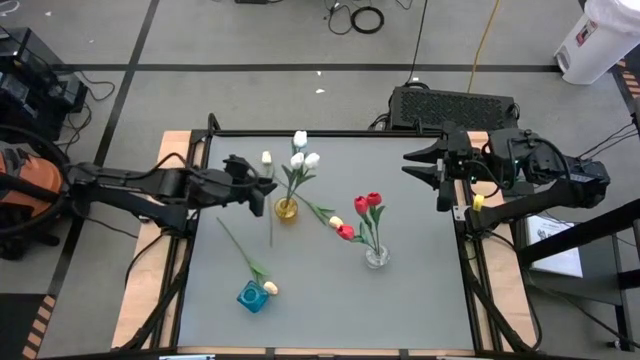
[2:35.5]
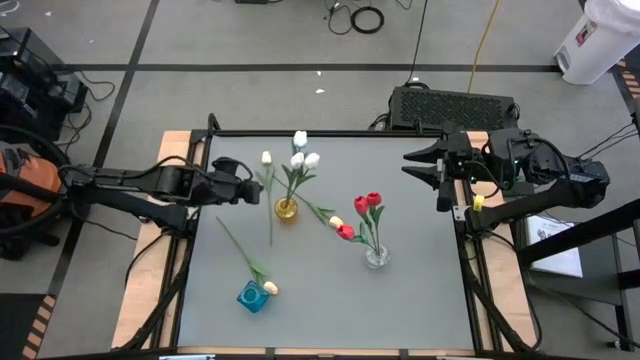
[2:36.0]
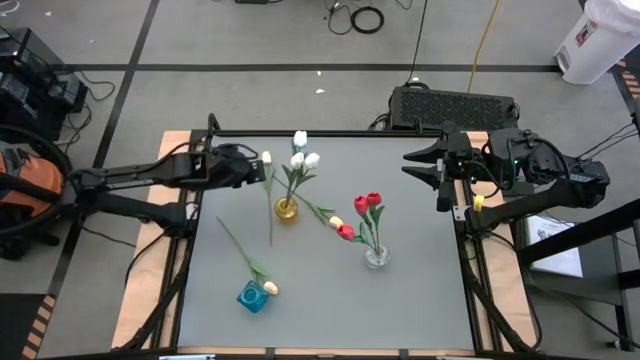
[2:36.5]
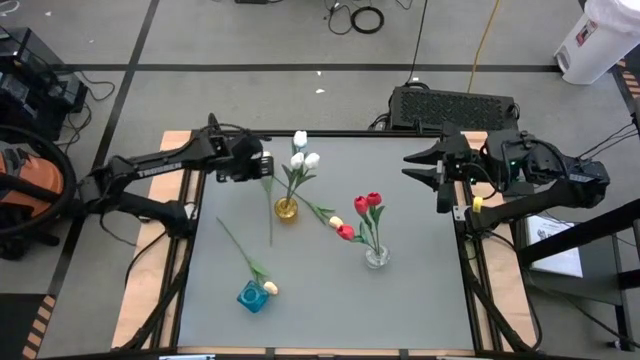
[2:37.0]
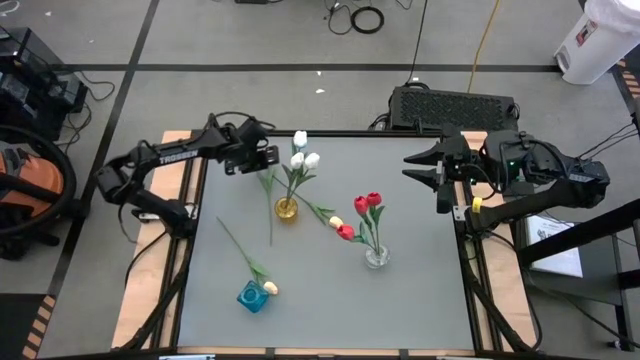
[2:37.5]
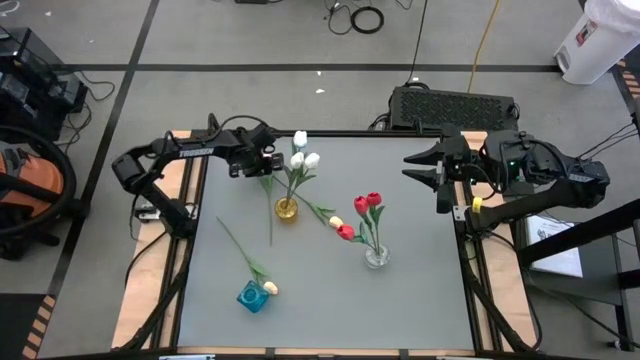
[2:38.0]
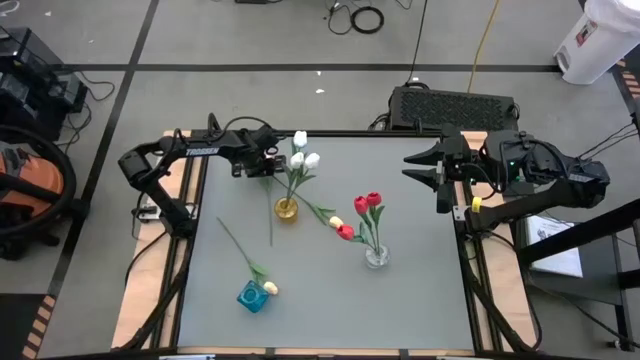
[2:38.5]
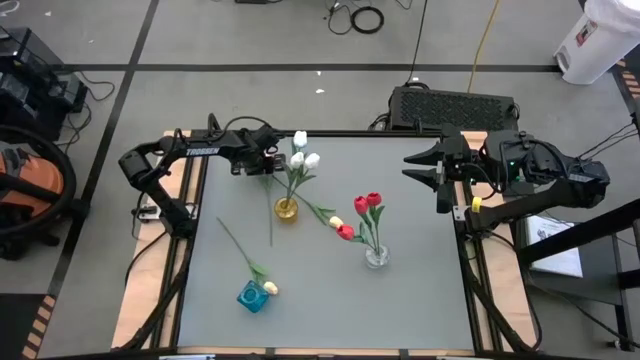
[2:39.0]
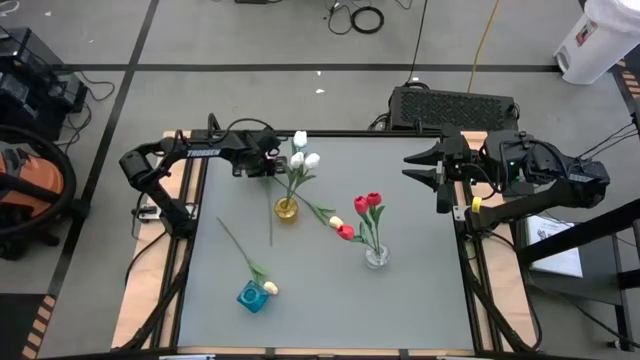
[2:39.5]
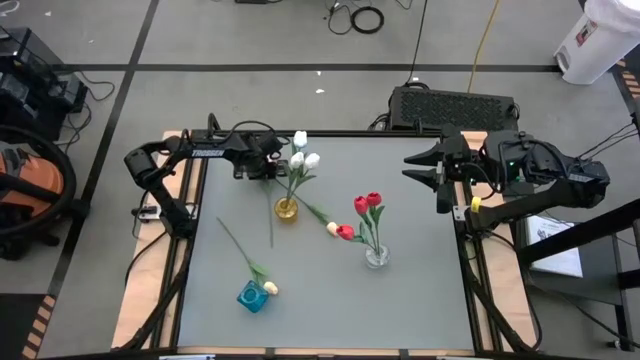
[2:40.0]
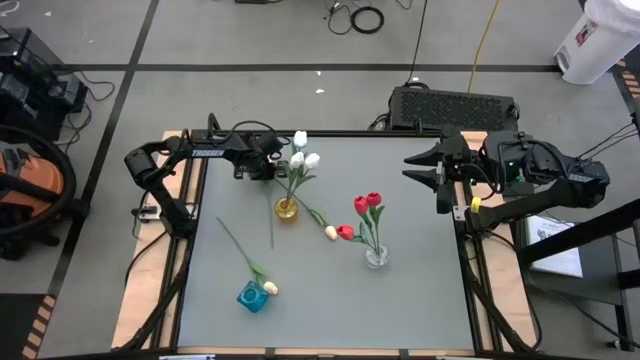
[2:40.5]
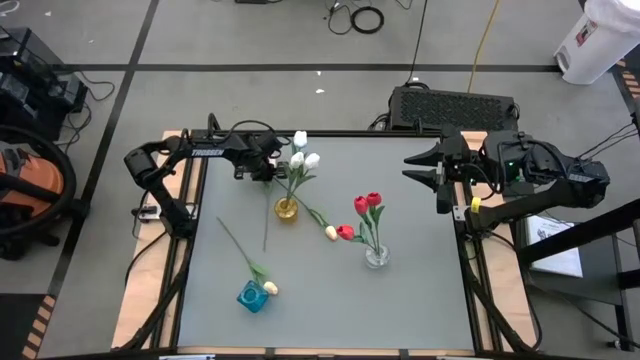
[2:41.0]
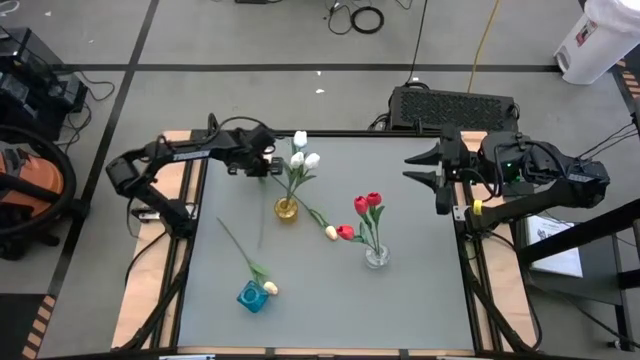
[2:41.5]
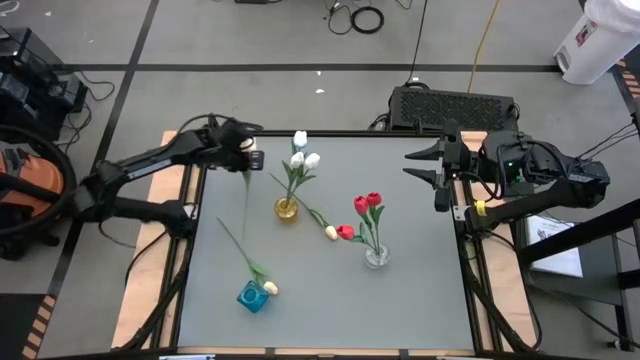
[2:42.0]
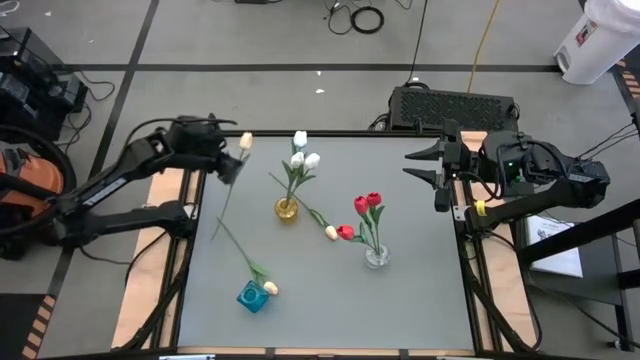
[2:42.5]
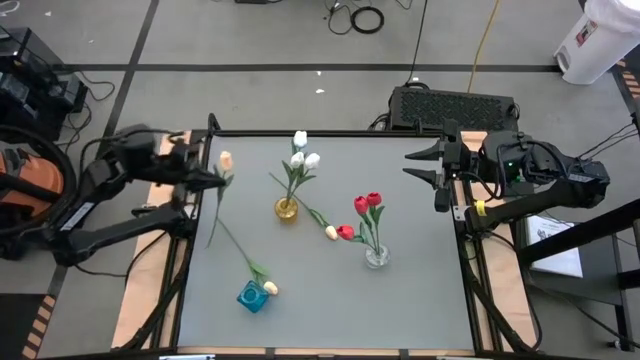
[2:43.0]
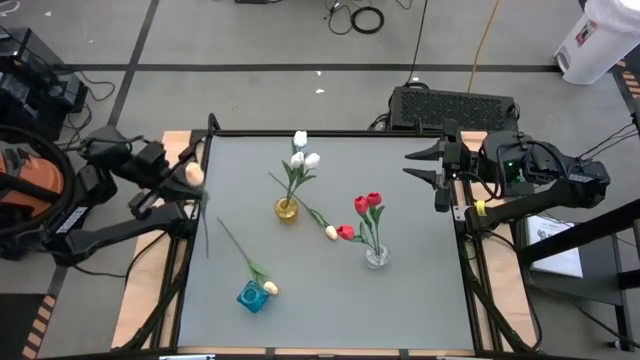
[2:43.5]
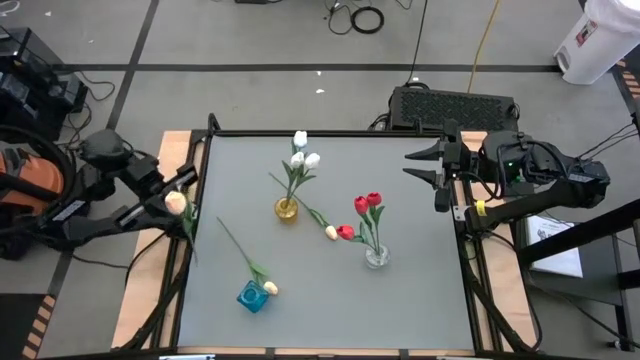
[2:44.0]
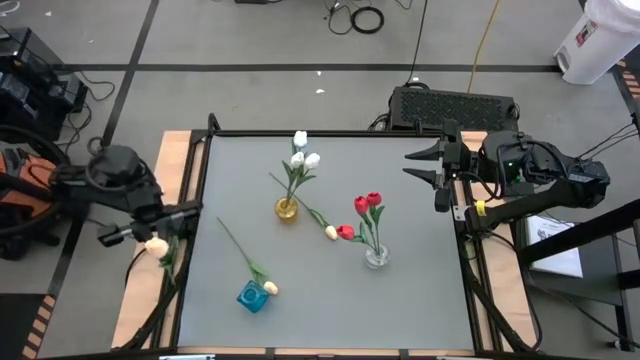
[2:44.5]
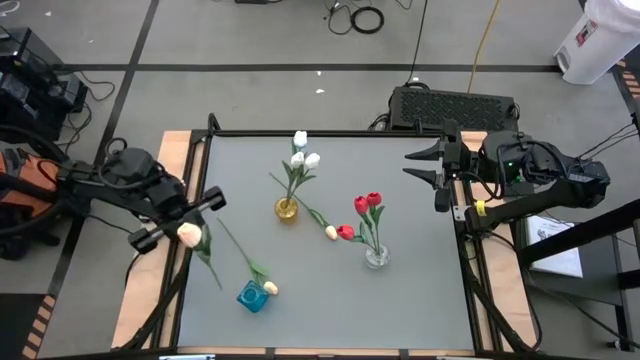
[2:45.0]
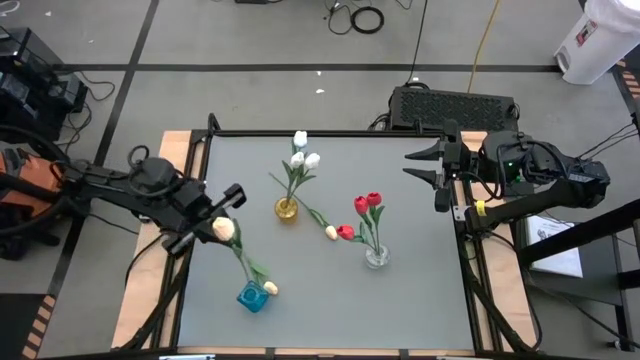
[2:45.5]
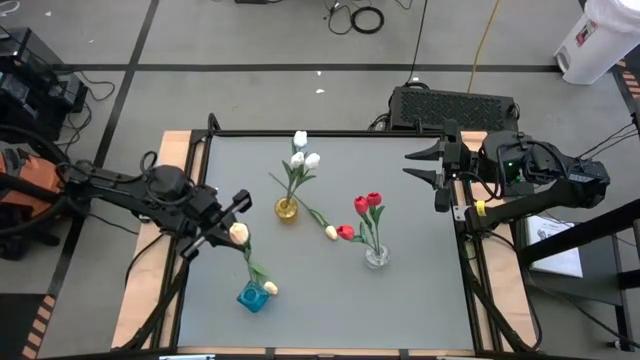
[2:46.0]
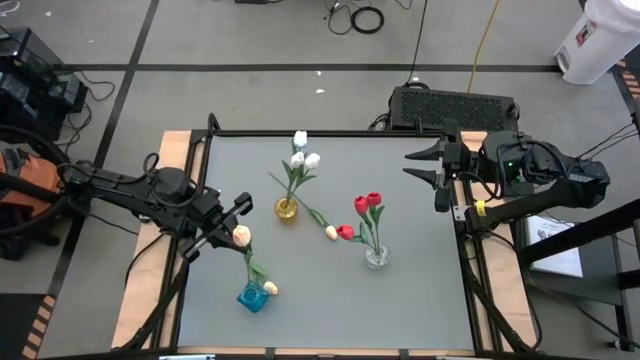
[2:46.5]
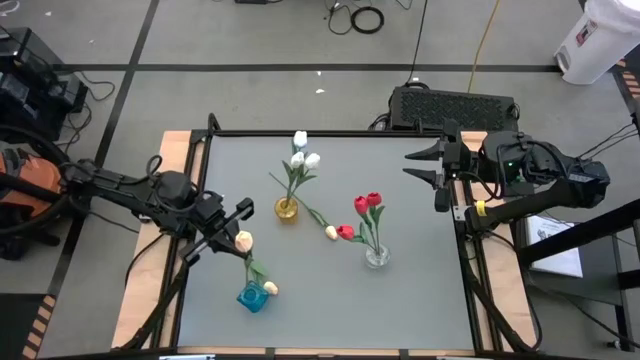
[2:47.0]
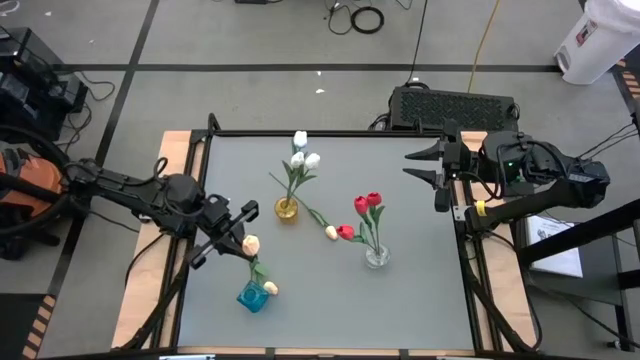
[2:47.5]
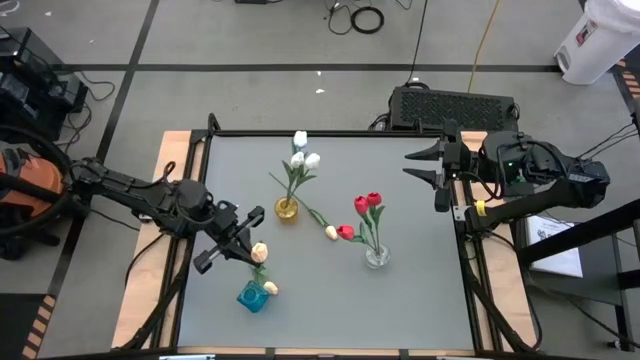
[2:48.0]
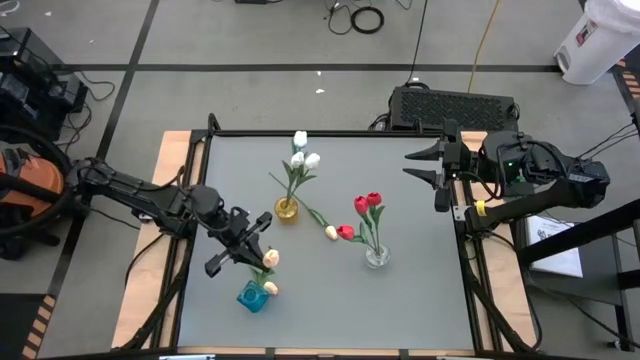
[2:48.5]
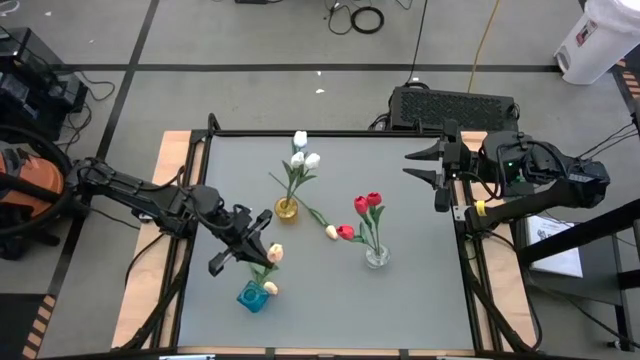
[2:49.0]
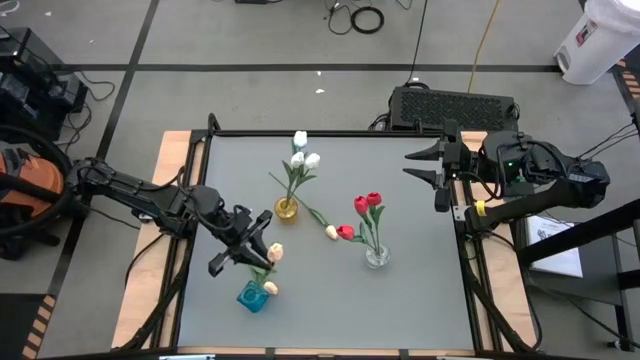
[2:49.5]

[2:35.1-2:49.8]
Task: Sort flowers into vase by color
Put the top yellow tulip into the blue vase

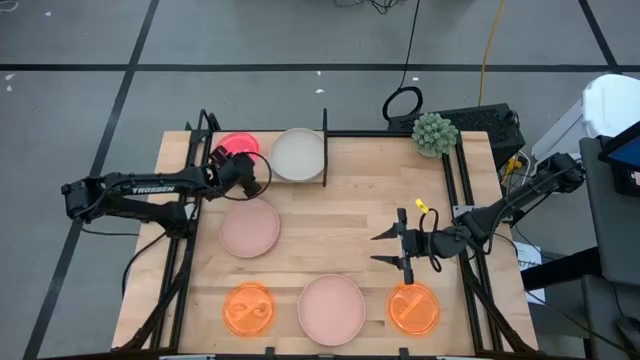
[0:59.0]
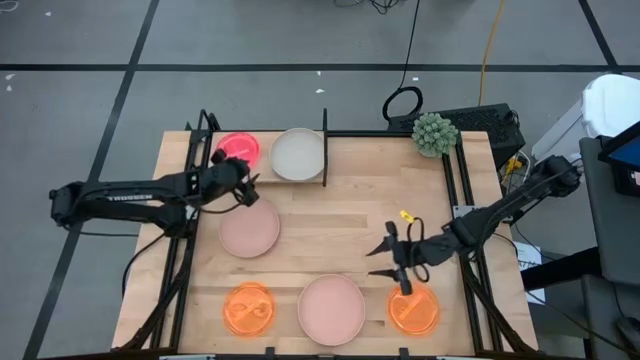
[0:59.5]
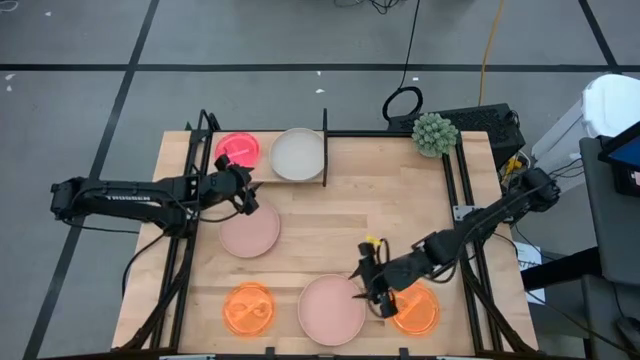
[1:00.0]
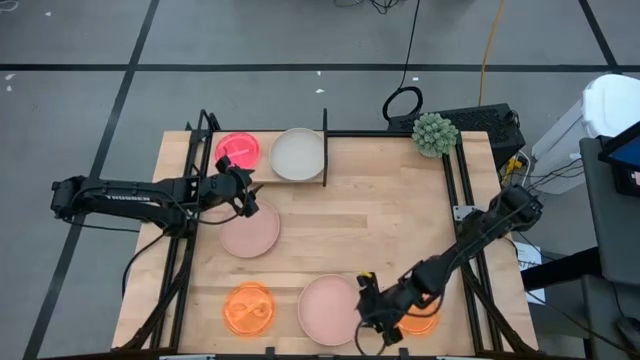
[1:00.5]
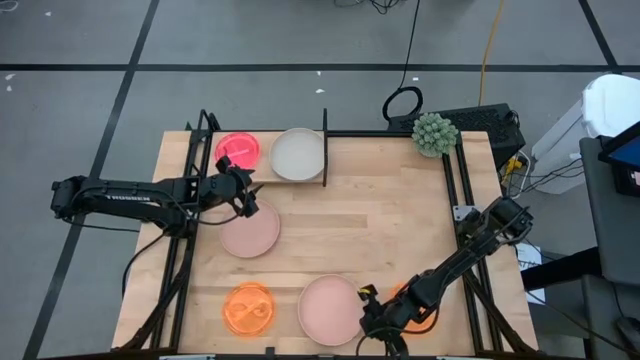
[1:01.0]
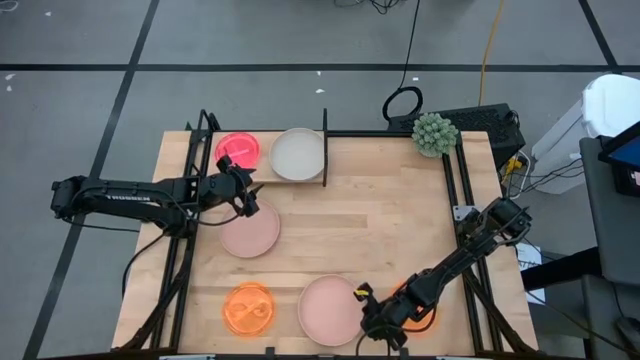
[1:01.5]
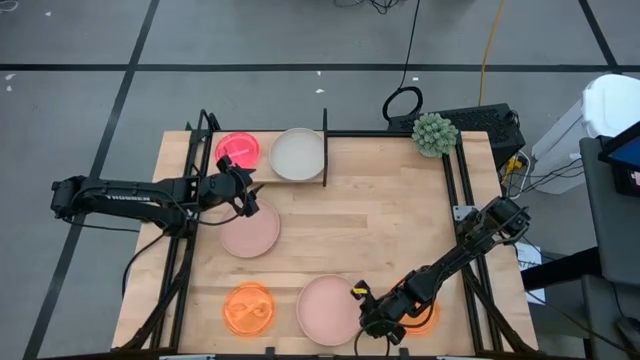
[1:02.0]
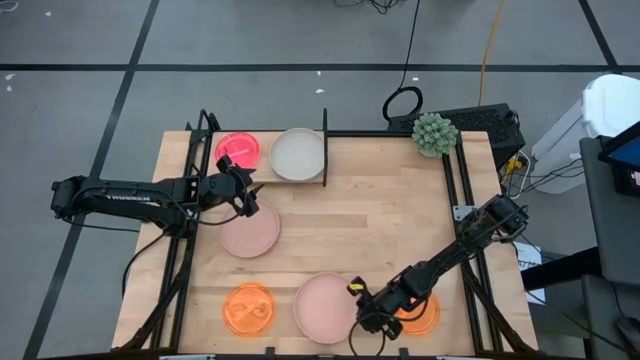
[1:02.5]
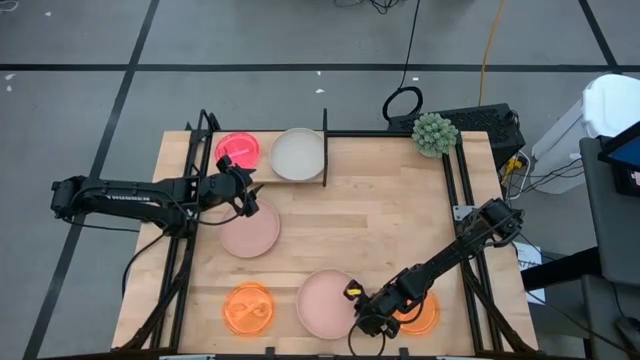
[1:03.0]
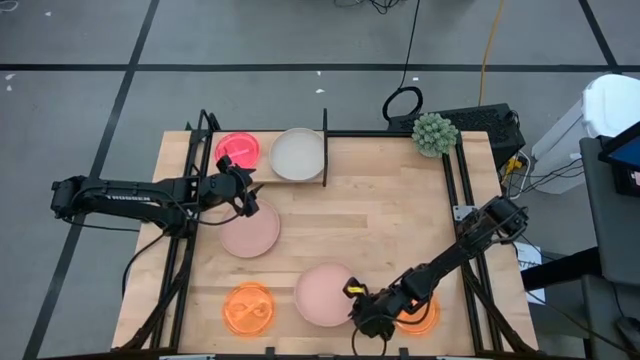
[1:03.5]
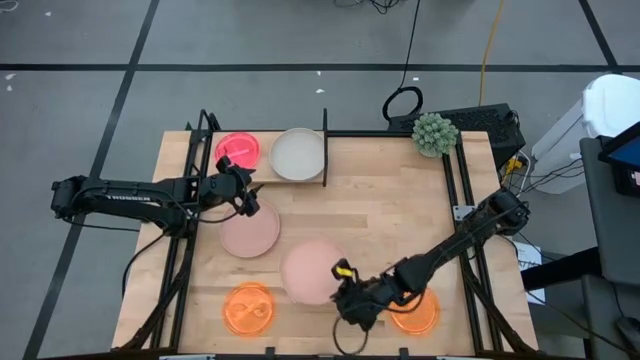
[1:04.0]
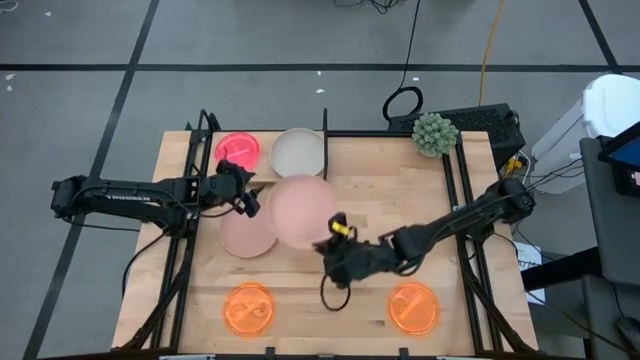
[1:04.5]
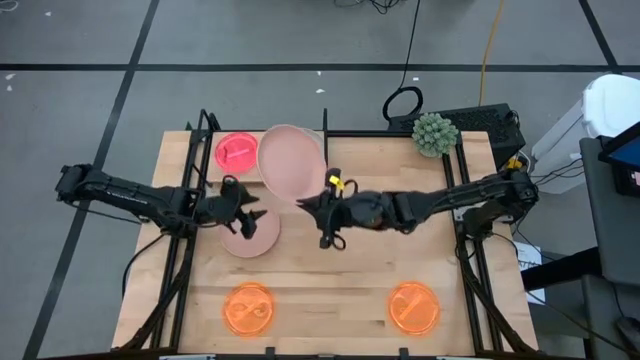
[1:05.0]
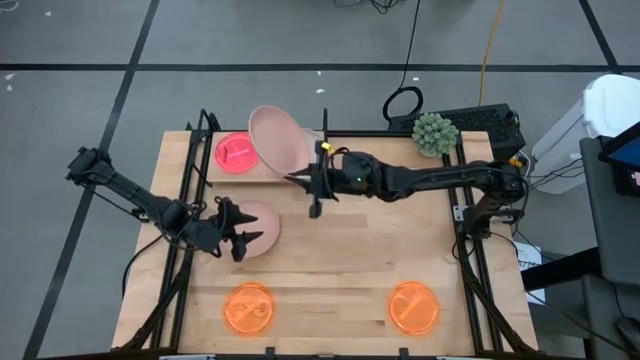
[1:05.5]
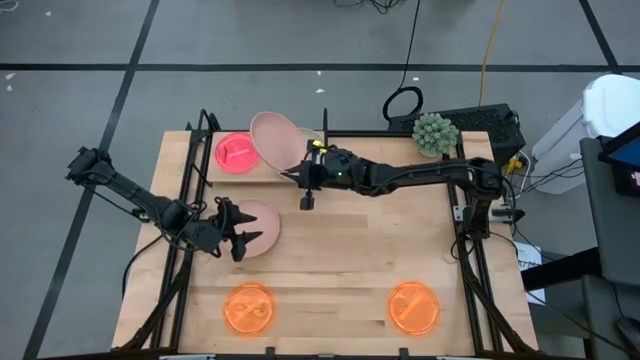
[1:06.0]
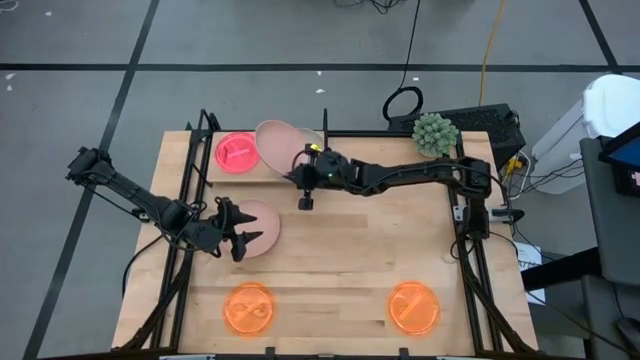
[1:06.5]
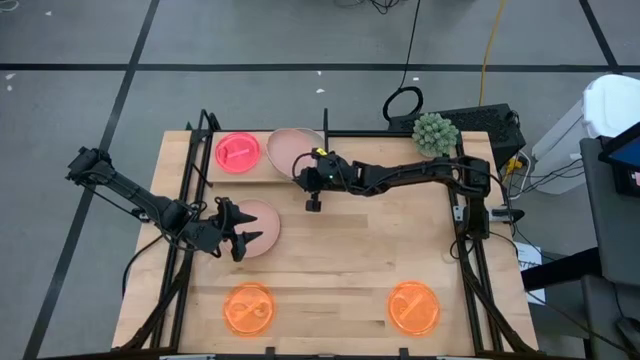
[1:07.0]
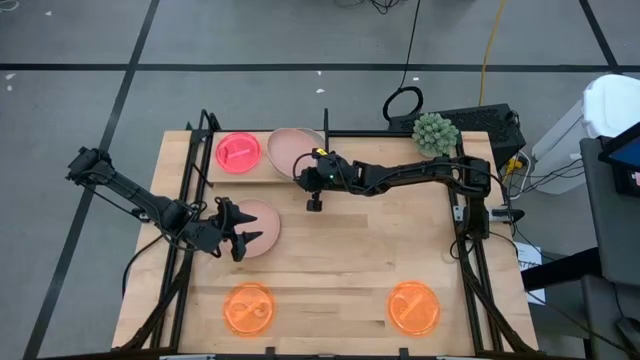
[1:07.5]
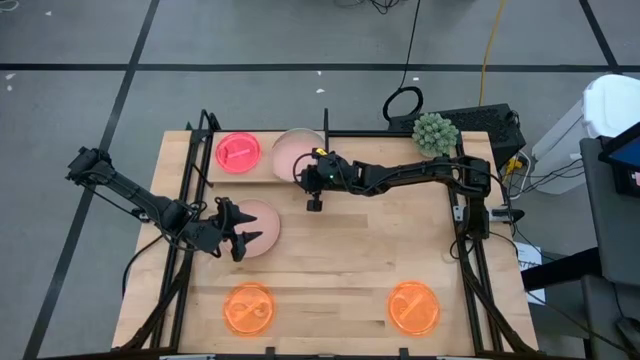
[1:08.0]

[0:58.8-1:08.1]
Task: Place and stack plates onto a shelf
Stack the bottom pink plate on top of the gray plate on the shelf
